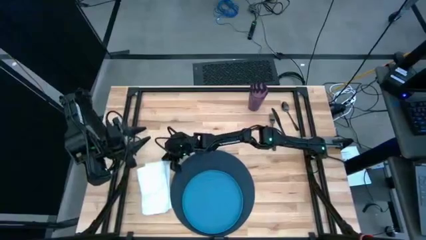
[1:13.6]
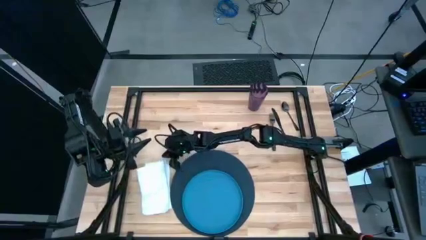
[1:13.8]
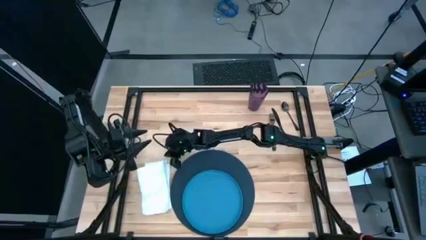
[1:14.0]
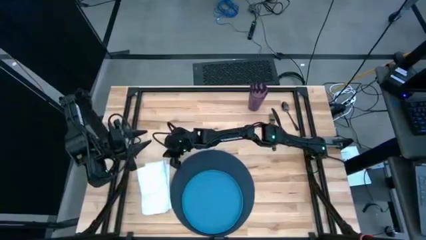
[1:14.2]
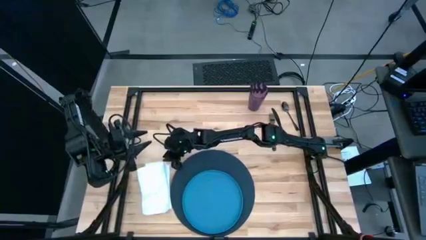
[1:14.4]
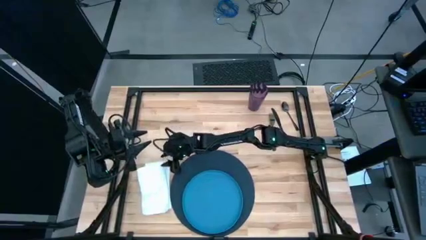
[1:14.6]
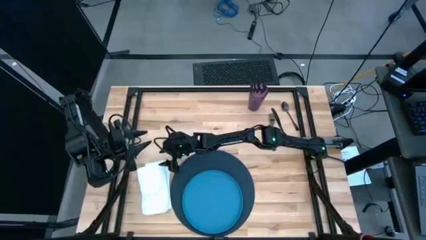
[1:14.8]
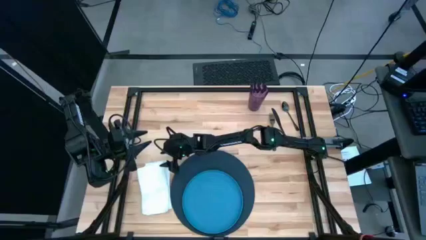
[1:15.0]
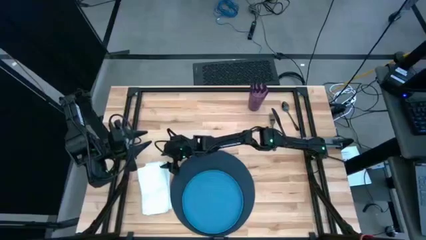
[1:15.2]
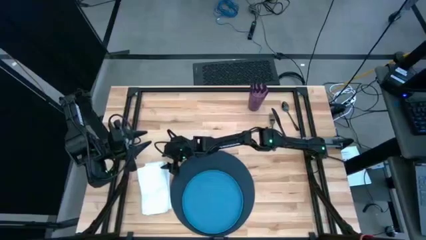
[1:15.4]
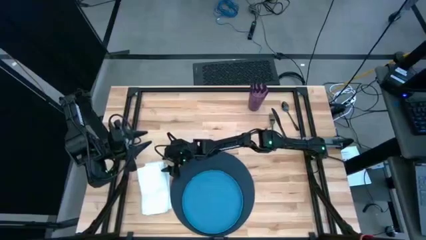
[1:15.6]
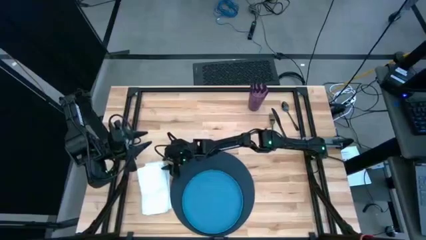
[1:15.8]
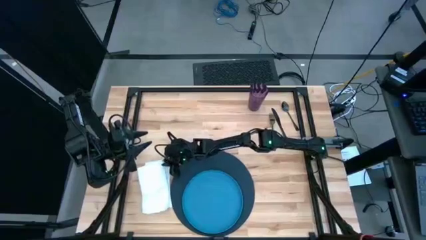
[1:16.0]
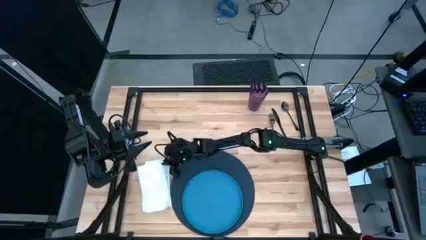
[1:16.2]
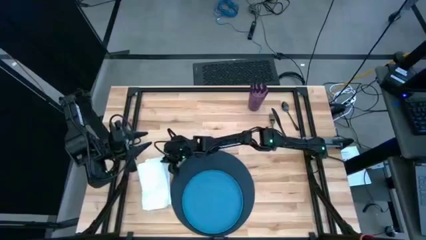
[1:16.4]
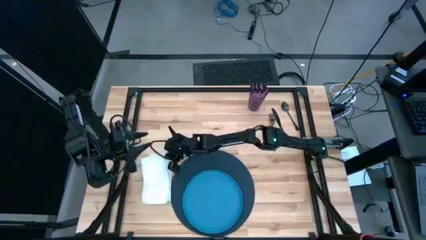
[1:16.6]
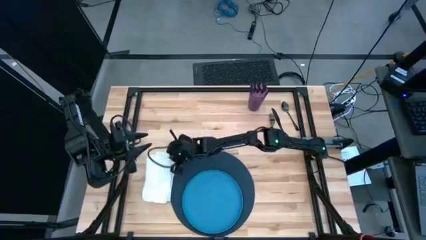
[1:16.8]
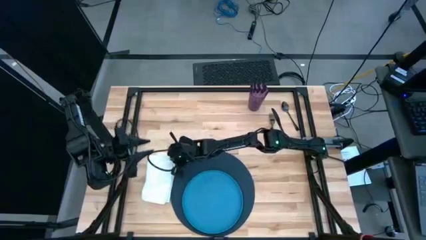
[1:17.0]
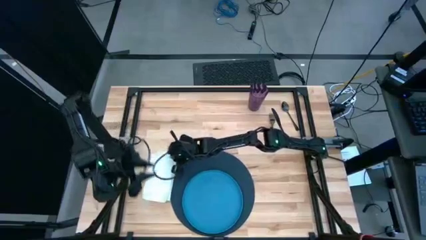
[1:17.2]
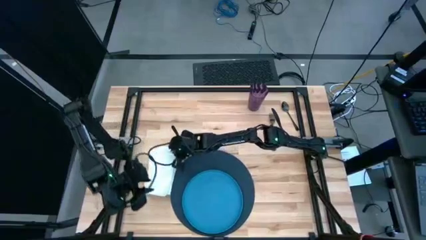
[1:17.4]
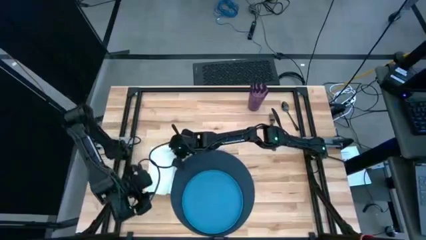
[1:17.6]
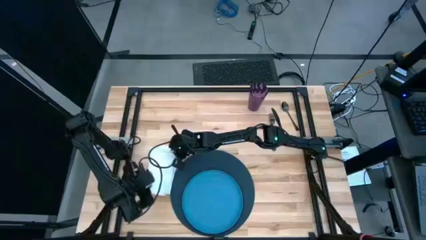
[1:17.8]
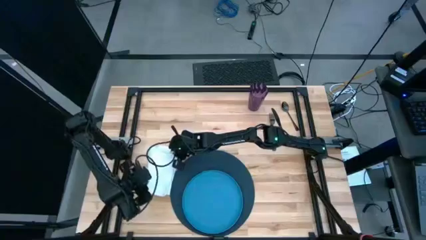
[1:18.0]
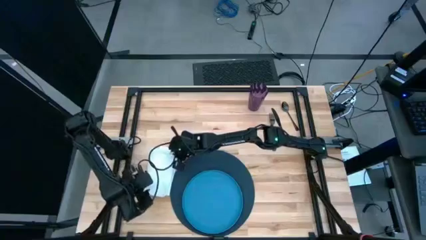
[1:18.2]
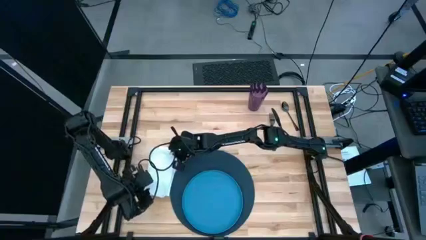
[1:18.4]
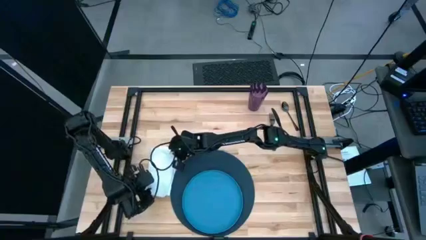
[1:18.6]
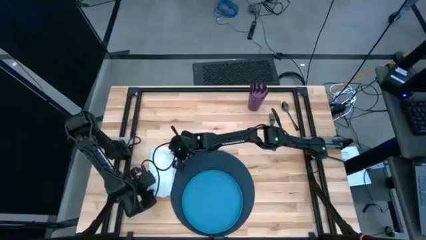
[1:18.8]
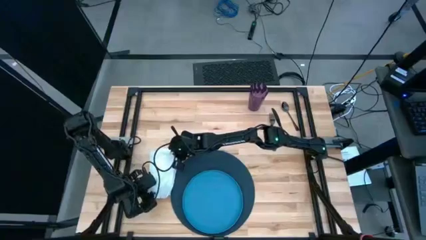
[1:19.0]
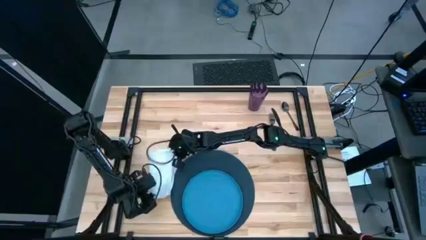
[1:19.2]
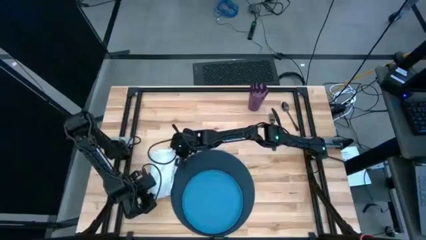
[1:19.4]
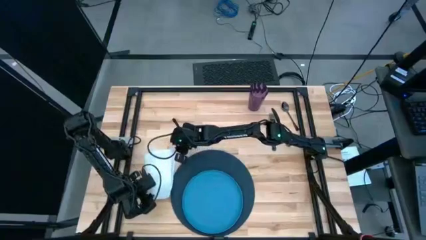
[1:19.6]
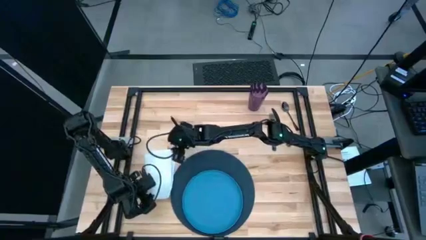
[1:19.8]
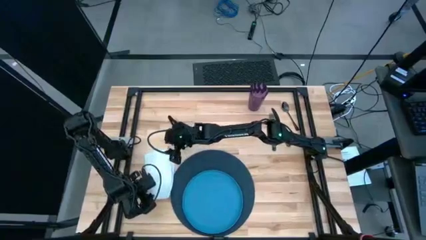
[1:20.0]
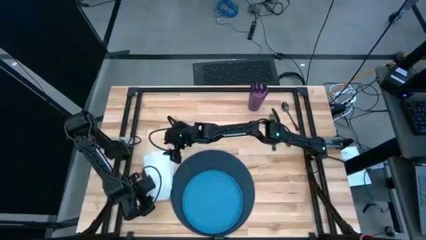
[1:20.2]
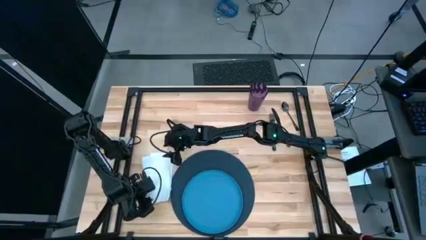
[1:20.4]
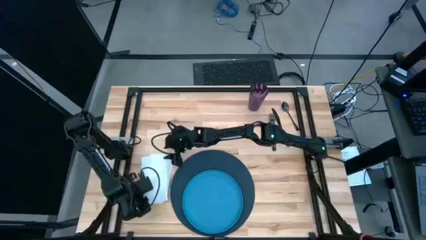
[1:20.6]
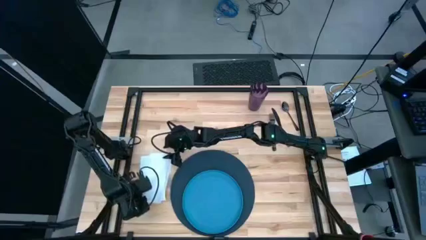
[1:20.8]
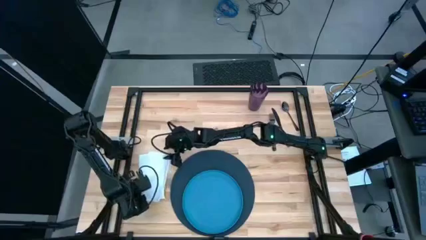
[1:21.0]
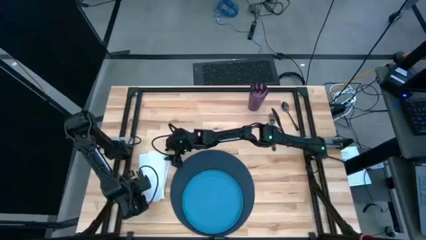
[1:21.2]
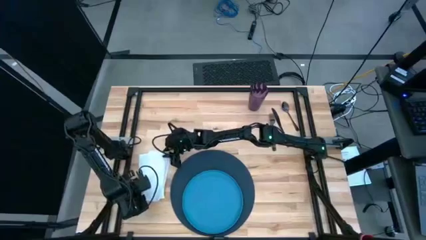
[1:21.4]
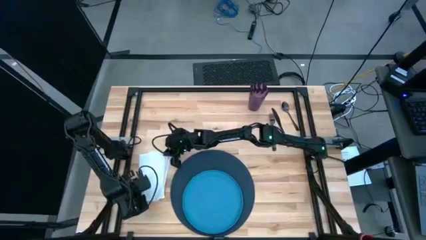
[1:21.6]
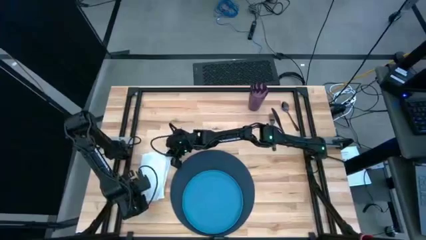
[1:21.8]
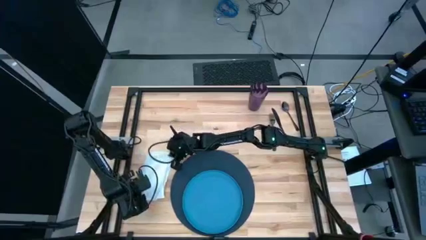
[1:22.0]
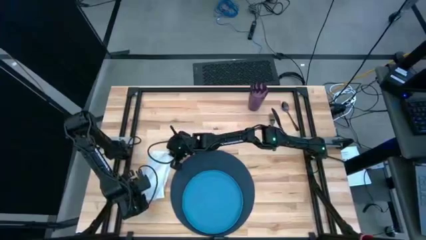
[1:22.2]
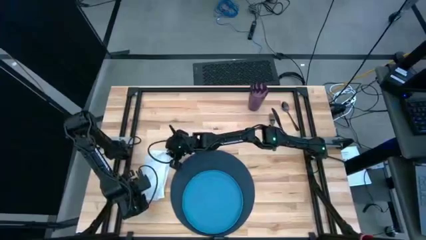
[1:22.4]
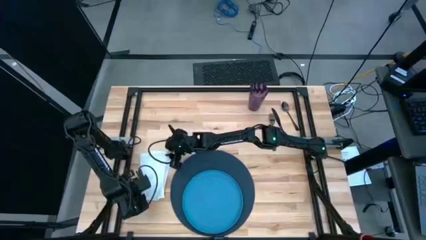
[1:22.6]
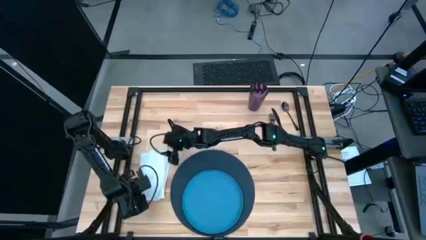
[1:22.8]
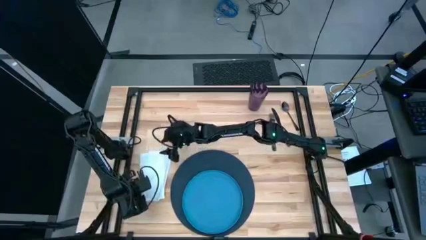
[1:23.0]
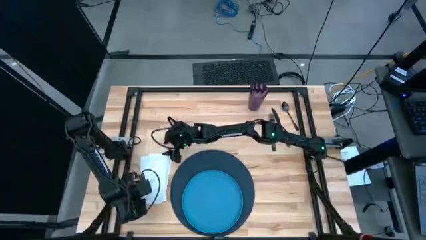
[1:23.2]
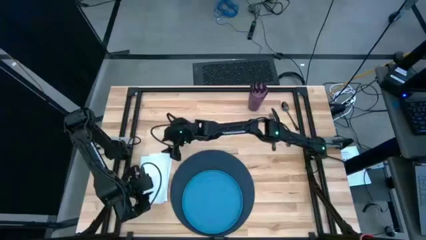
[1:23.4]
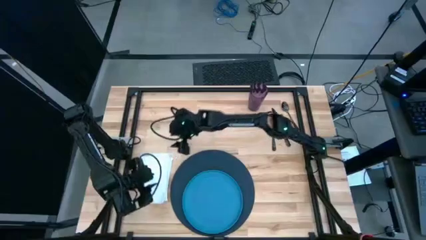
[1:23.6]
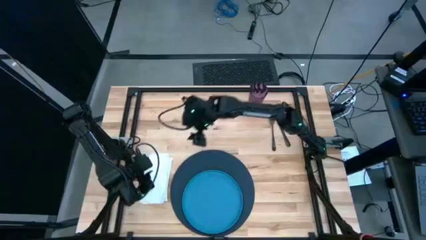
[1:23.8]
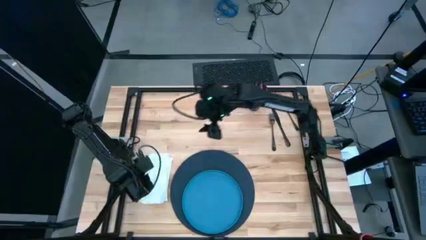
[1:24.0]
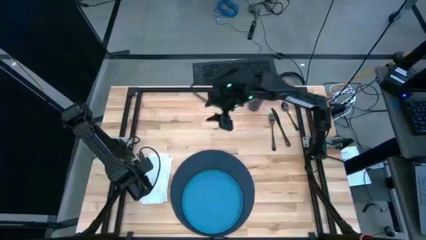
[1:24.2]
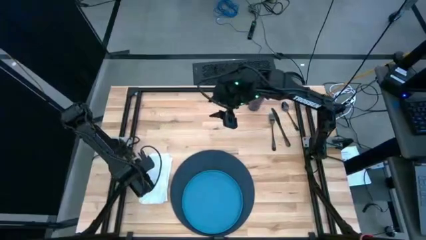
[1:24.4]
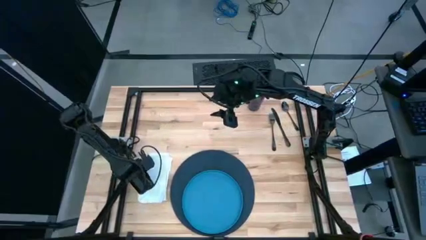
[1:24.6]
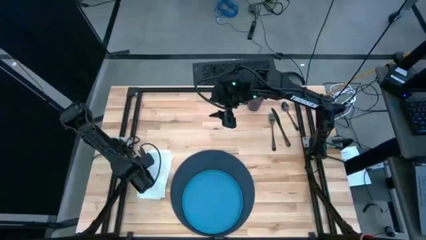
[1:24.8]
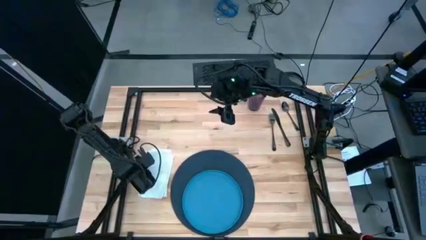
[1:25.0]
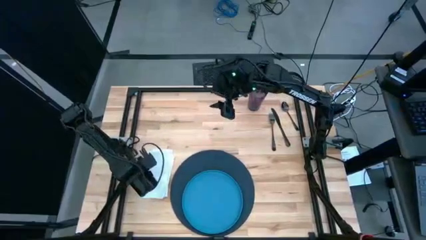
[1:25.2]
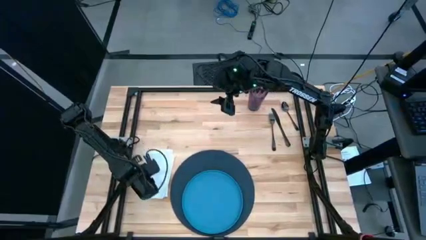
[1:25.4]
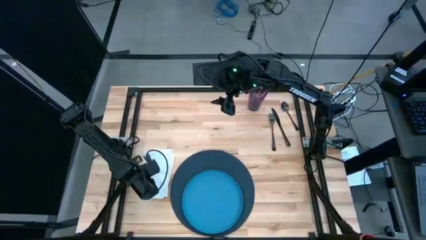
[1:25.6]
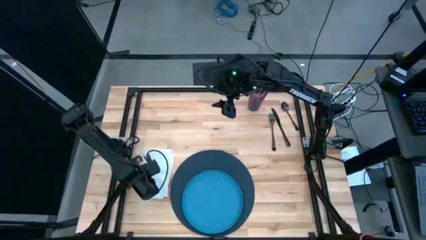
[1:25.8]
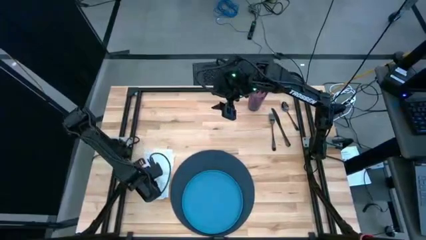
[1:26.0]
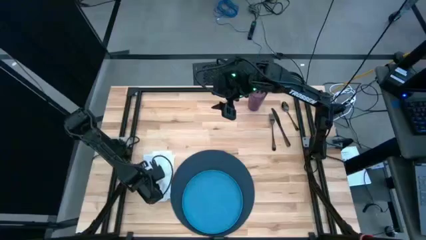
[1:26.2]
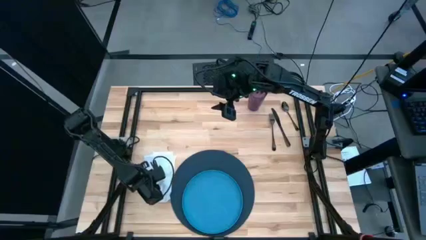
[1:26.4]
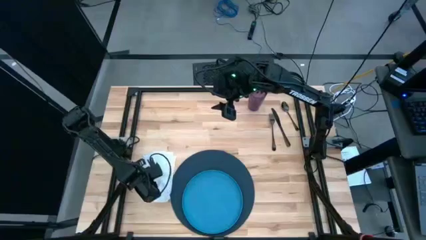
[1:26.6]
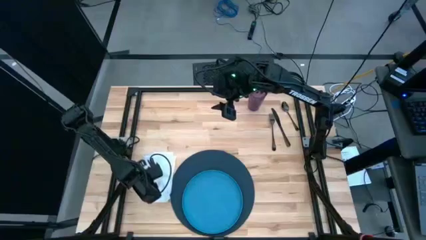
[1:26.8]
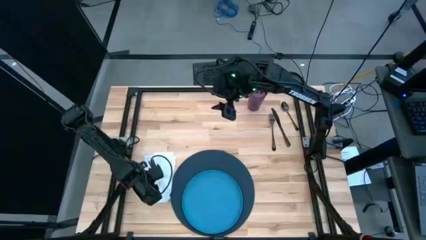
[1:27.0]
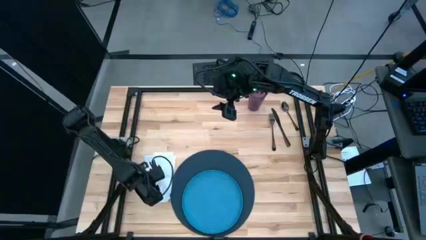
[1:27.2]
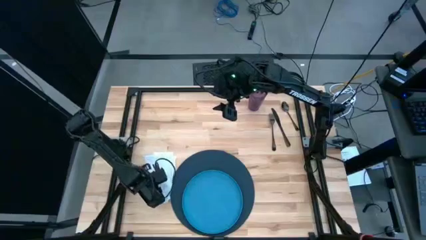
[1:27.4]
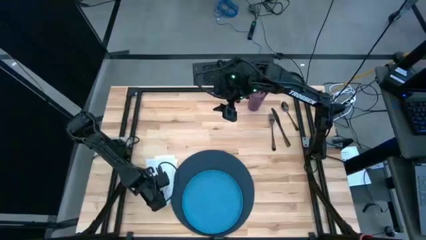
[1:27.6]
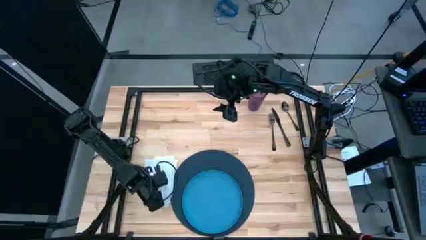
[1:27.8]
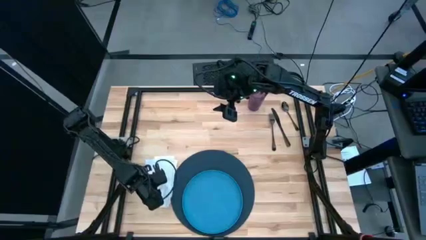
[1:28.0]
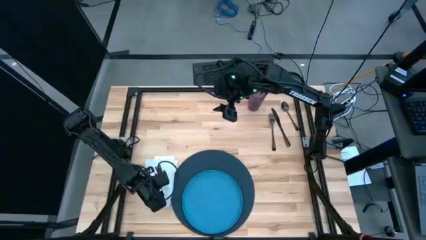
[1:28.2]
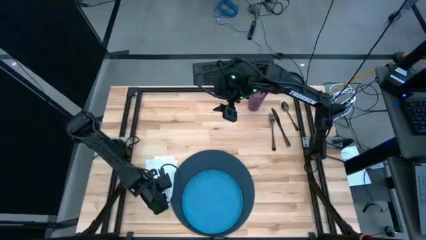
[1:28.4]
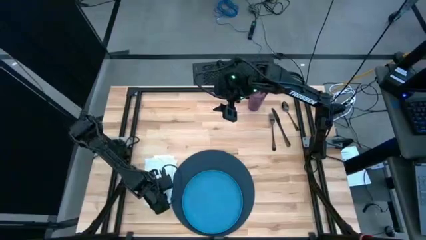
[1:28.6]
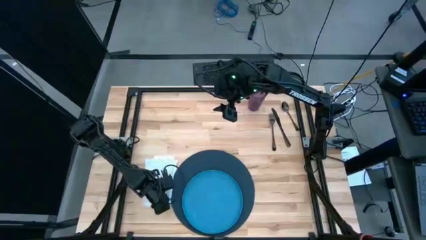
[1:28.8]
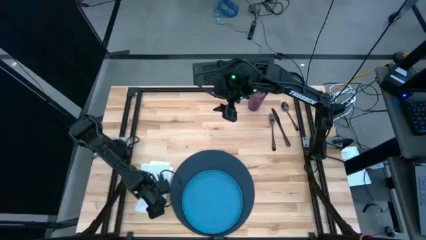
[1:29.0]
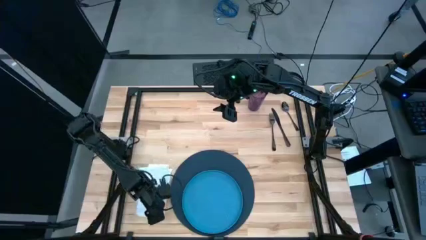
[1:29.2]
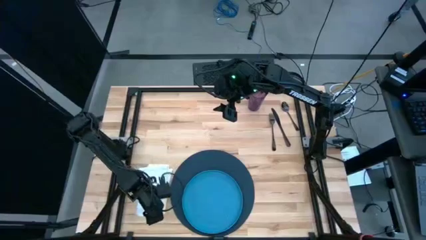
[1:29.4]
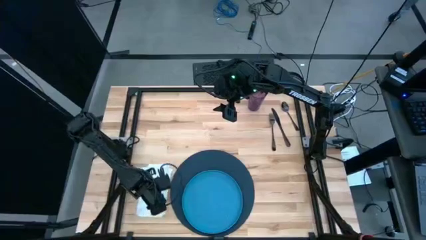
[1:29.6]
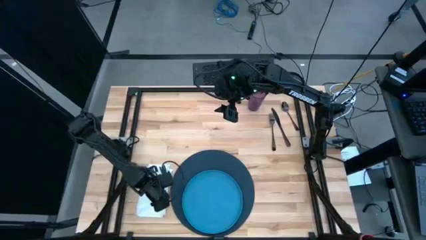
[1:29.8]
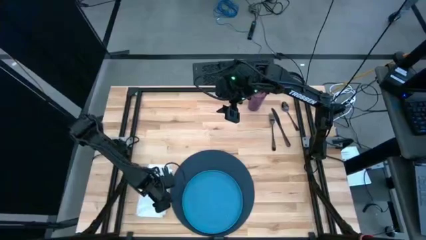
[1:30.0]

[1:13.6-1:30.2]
Task: Set table place
Adjust the table napkin
